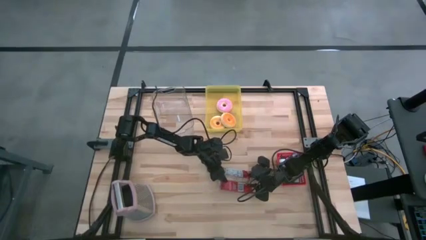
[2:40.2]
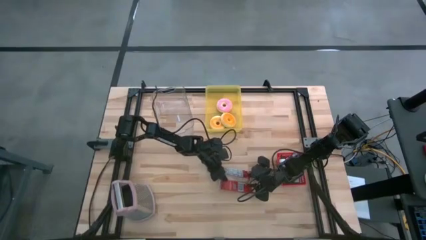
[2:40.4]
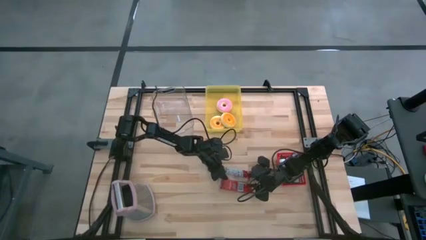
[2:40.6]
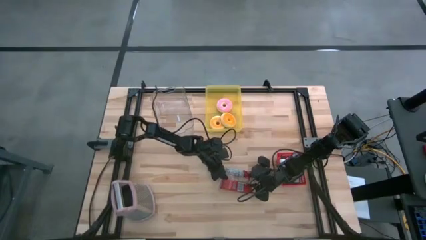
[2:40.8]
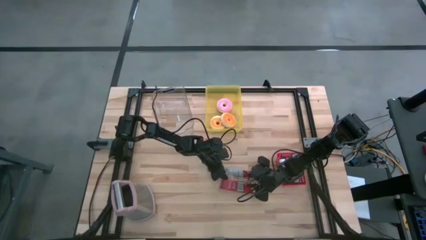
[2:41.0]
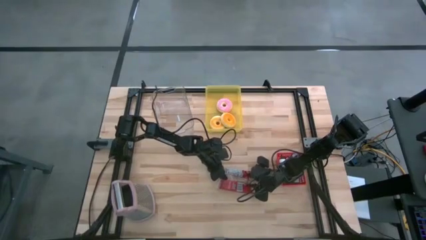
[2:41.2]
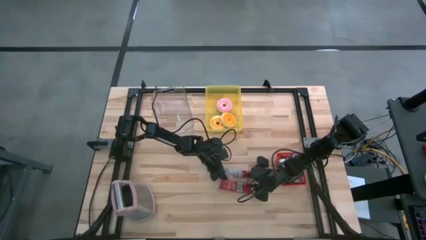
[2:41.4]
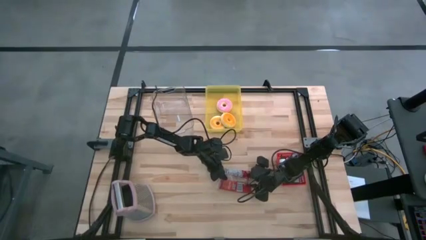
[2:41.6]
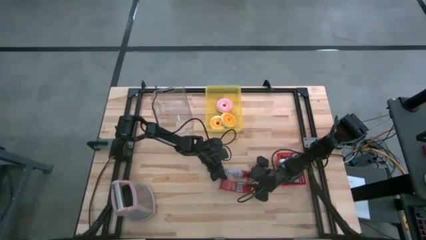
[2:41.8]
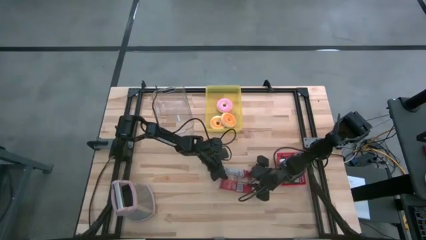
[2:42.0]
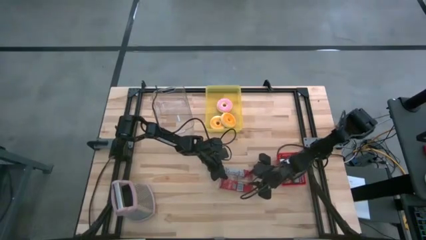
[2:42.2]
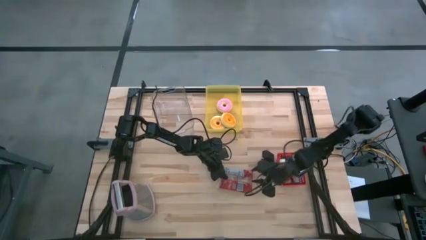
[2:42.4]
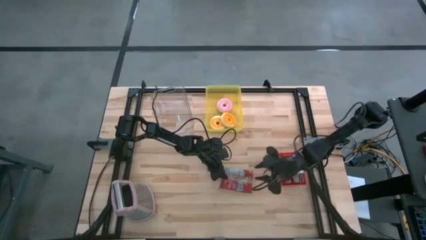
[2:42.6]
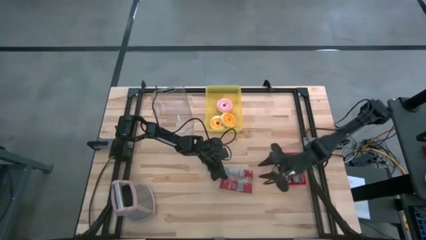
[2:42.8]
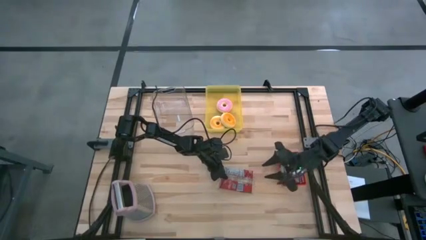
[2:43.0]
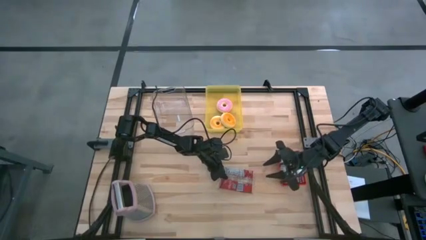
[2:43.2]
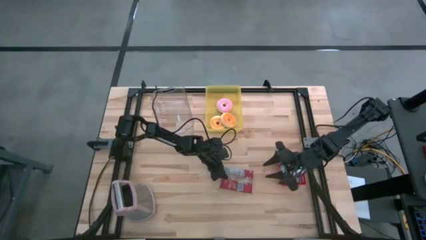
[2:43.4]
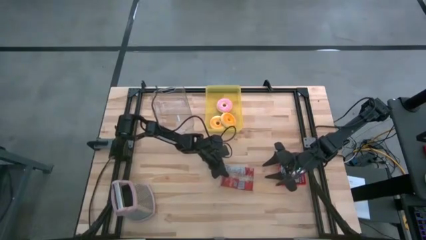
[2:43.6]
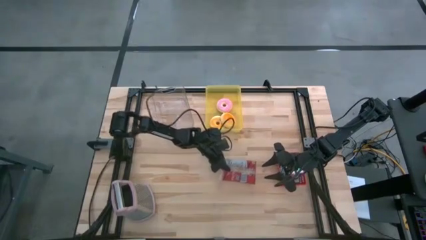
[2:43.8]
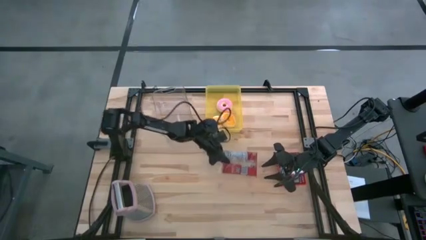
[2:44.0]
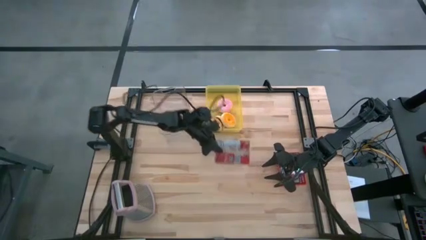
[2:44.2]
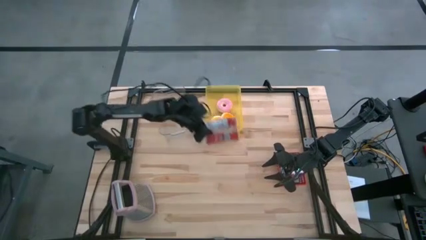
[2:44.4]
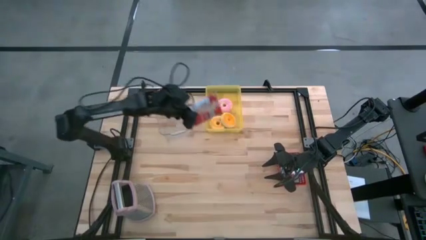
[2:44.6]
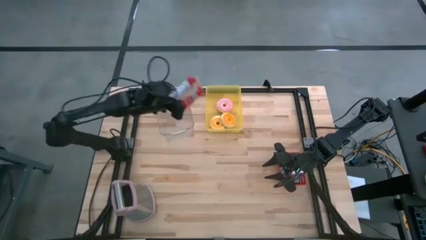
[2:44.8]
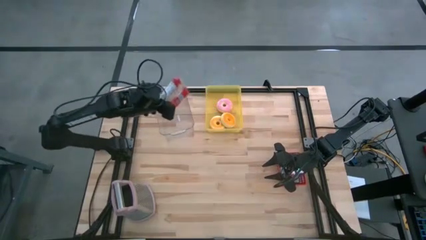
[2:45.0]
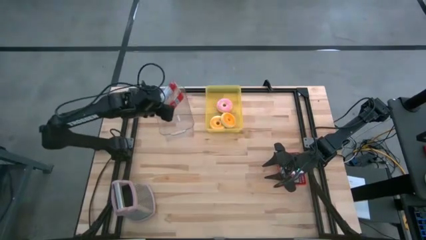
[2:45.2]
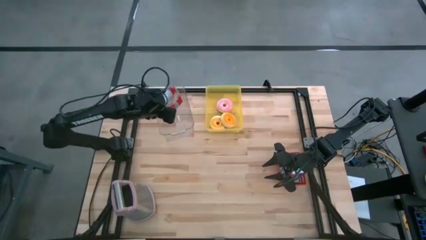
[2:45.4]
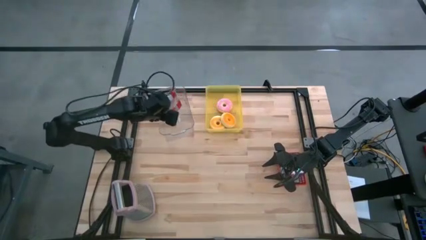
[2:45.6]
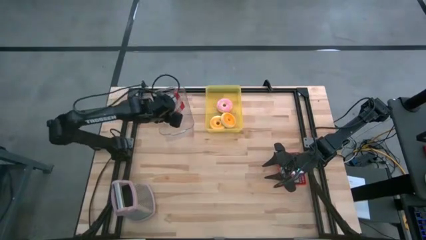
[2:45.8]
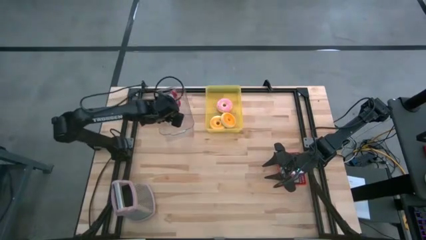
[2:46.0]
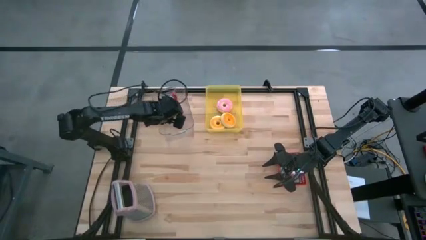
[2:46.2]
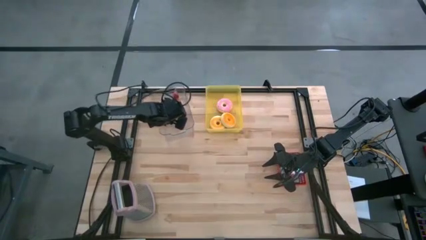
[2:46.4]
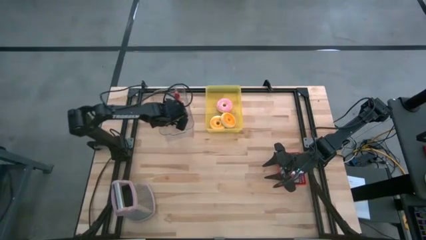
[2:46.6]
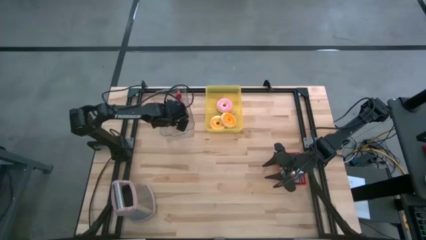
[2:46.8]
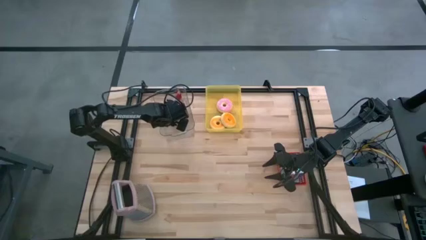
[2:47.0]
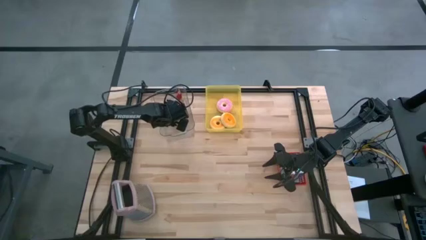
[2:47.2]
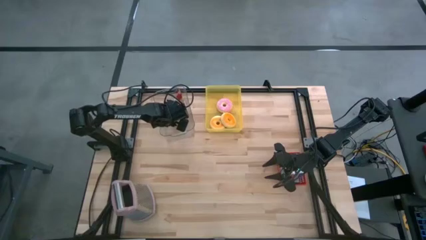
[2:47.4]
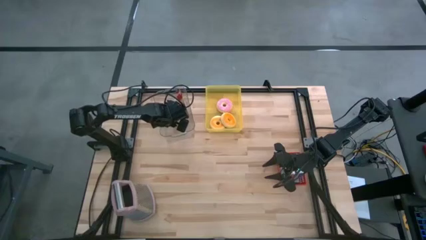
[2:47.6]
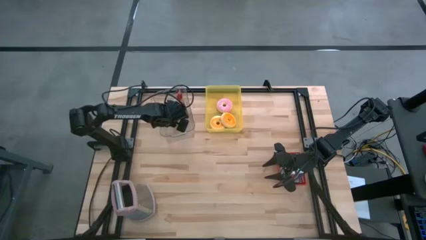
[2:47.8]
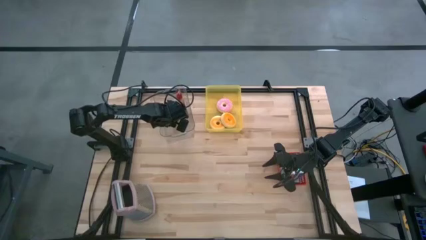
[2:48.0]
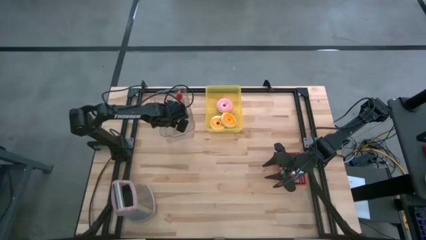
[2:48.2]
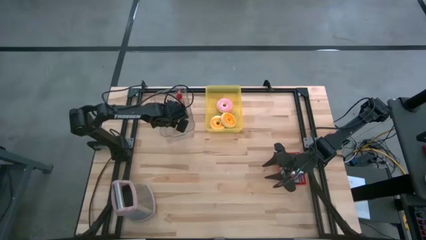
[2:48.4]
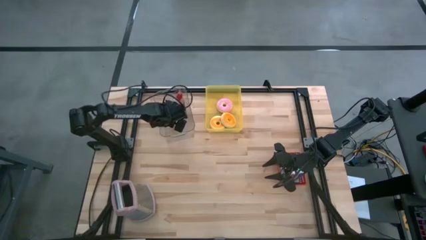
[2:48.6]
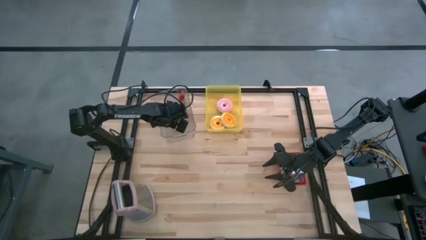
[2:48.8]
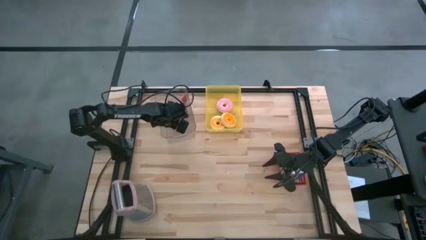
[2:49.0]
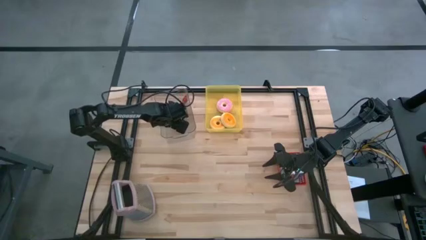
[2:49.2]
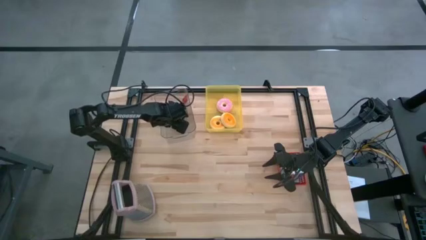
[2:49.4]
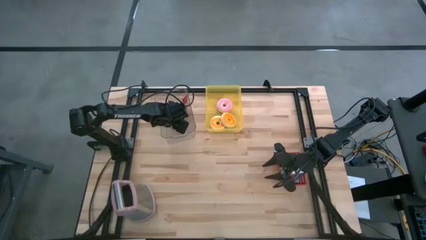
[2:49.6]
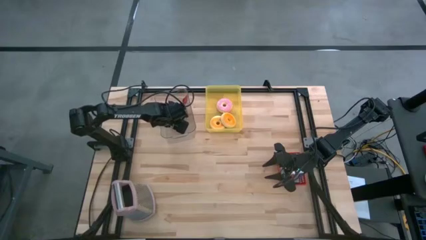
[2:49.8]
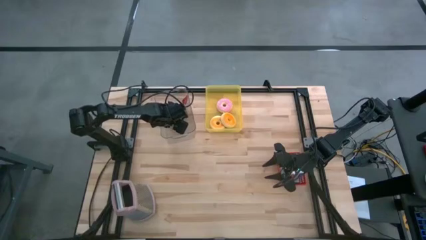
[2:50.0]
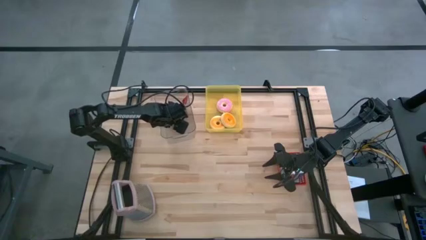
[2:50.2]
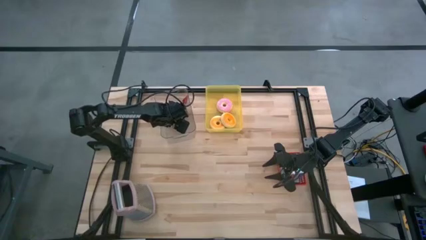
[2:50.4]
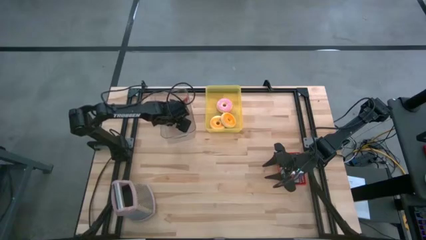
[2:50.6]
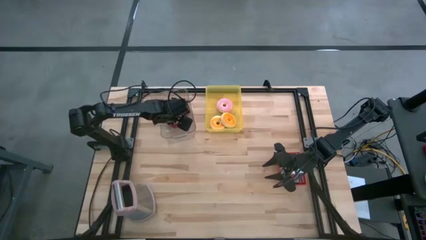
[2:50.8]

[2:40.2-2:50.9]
Task: Pick & Place Food Item
Put the red popcorn bag into the transparent bin

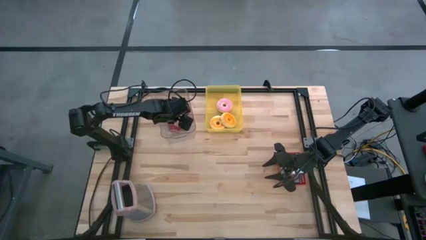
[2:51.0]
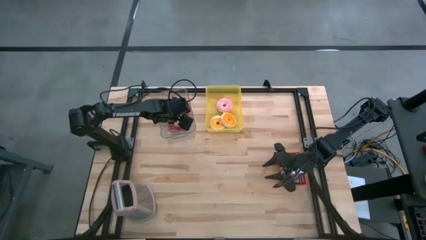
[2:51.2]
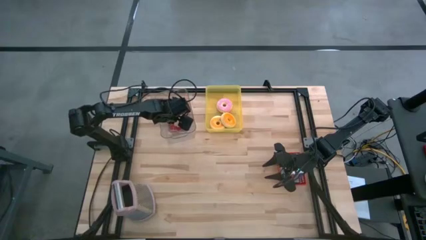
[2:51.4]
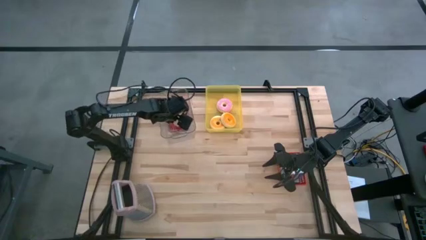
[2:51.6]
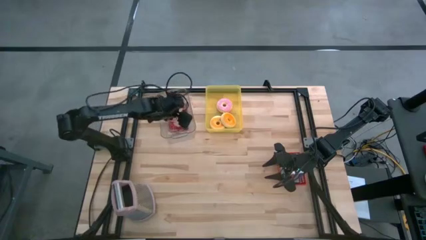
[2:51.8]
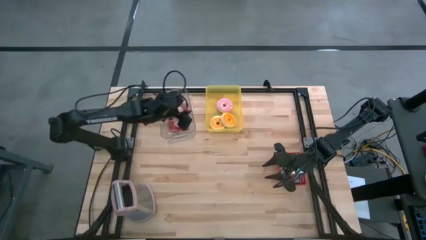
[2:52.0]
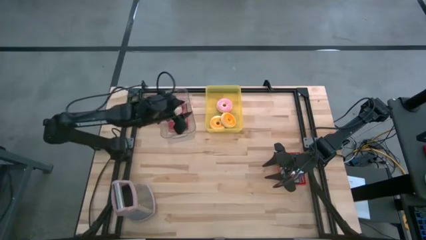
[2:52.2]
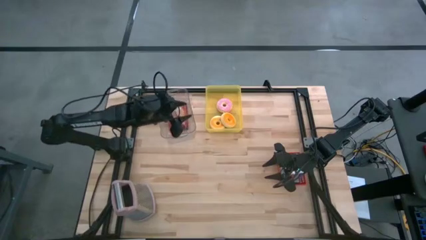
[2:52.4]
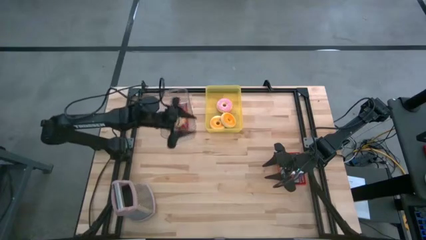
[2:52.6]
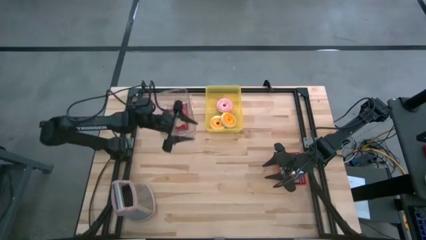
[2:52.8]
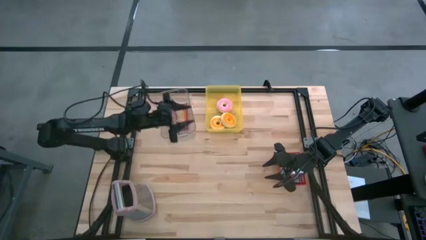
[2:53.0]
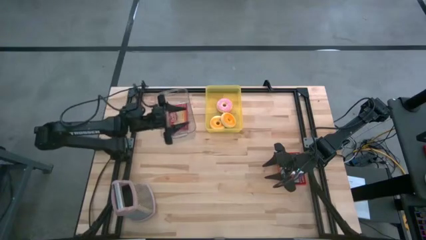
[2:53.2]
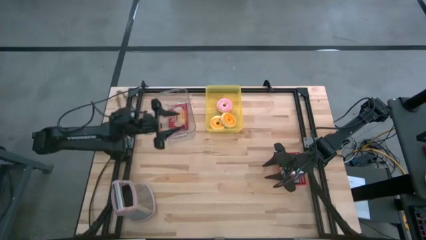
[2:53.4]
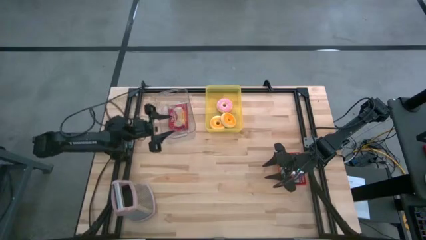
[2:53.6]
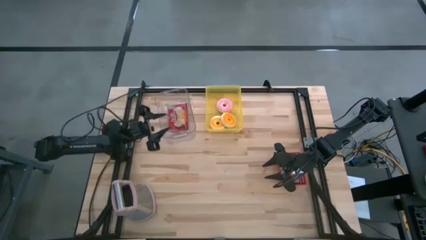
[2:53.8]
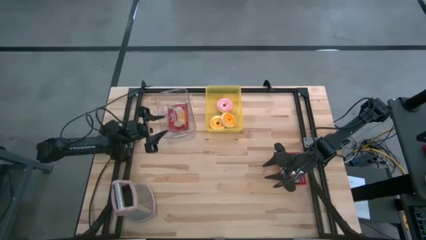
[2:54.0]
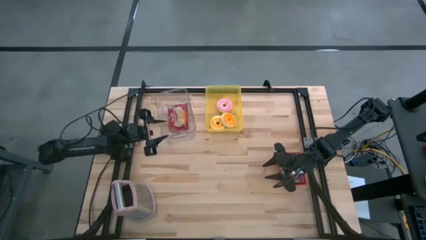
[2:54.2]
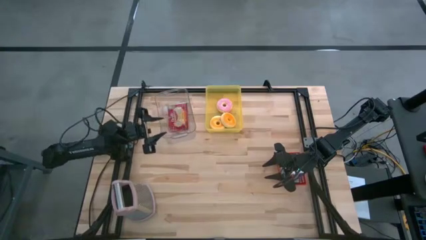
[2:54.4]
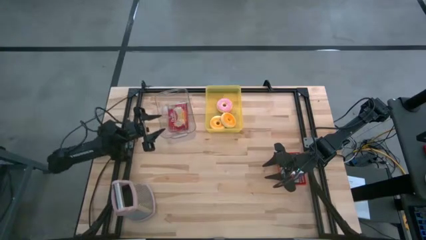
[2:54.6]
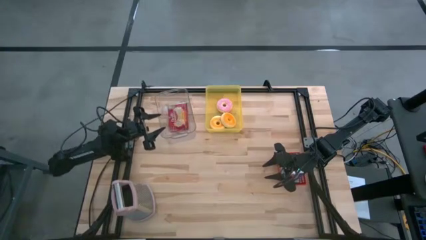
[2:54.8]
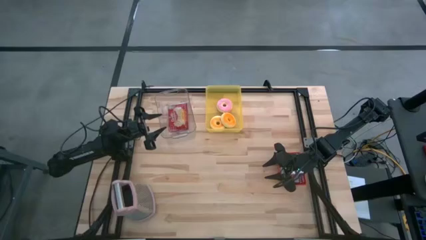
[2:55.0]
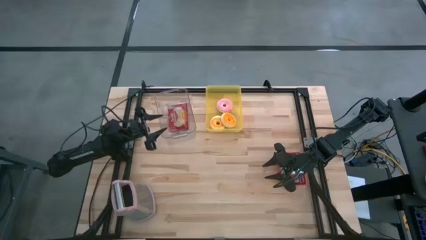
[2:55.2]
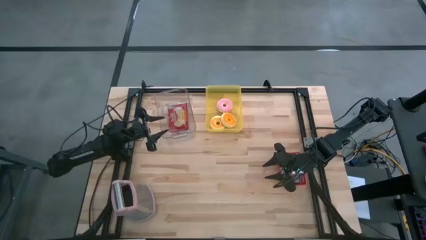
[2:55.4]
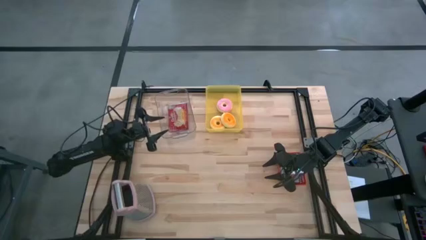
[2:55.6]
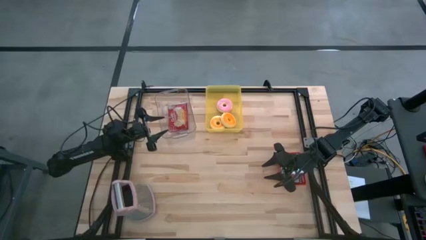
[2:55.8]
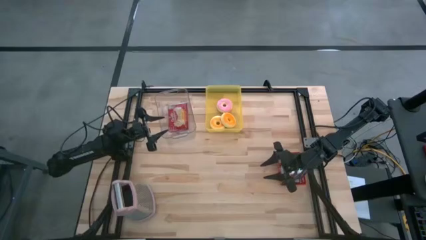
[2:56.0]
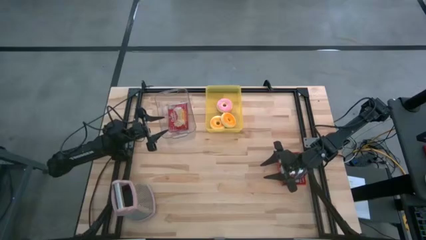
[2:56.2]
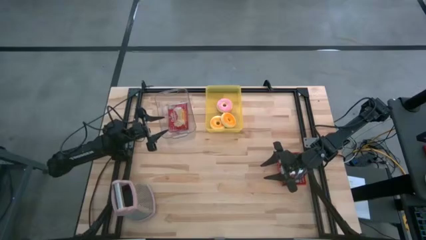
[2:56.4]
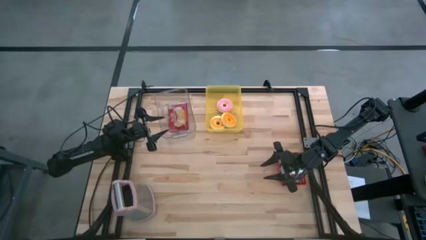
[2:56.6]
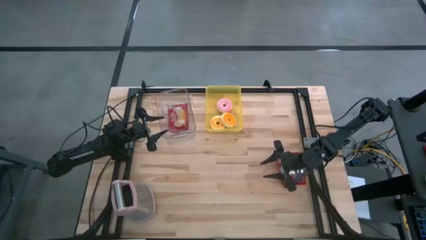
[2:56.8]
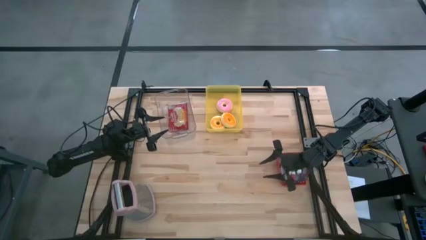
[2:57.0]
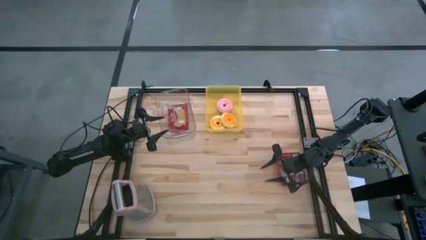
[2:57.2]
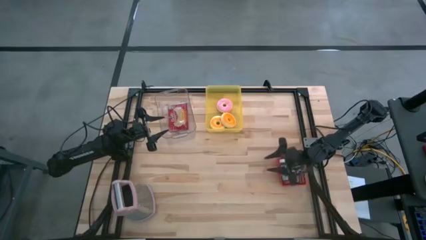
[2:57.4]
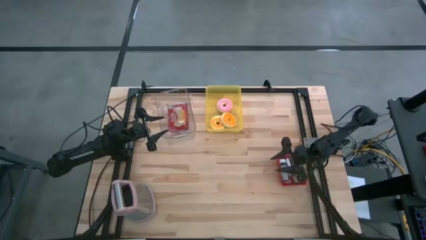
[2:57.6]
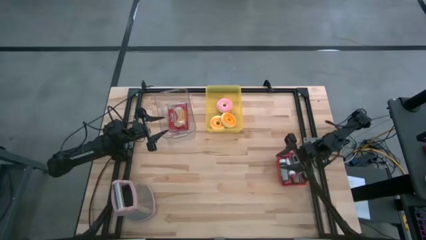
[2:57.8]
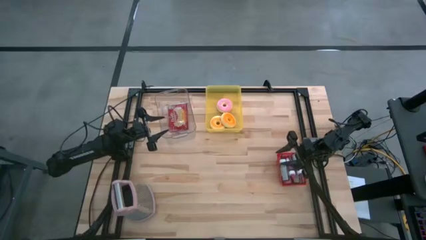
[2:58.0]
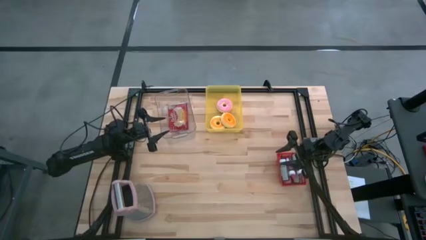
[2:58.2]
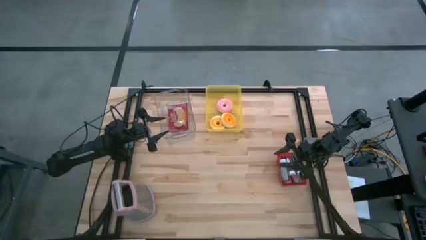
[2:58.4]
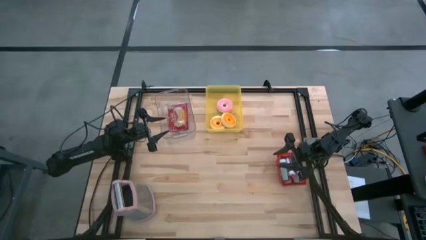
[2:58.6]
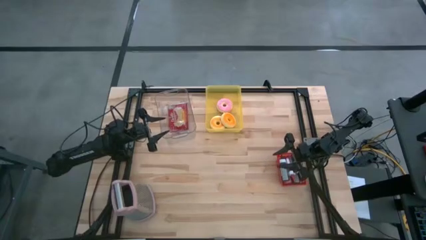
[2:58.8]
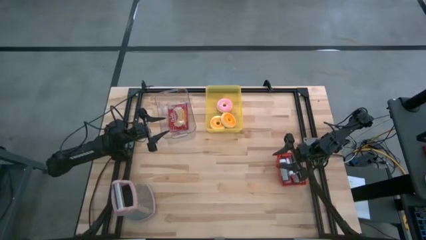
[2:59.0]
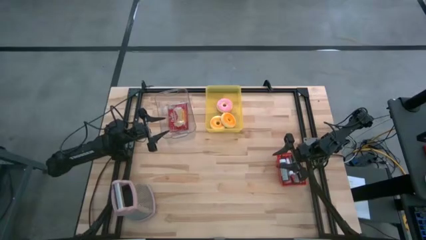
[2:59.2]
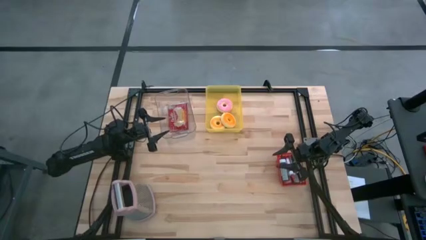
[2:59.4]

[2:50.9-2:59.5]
Return to Home Position
